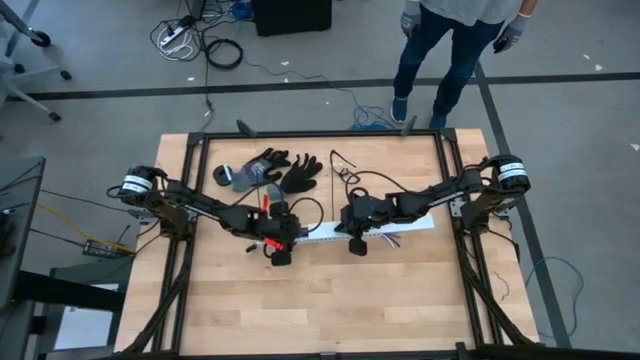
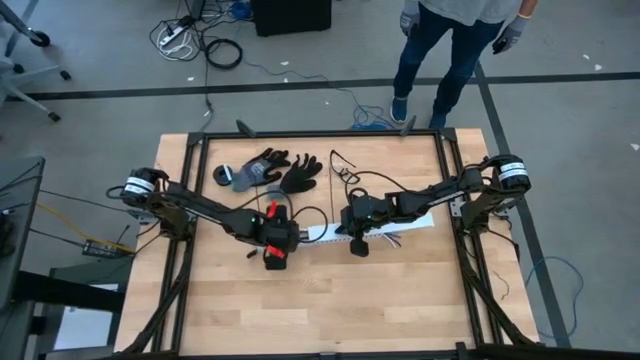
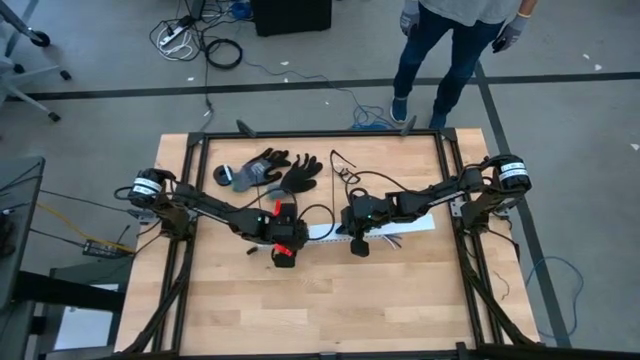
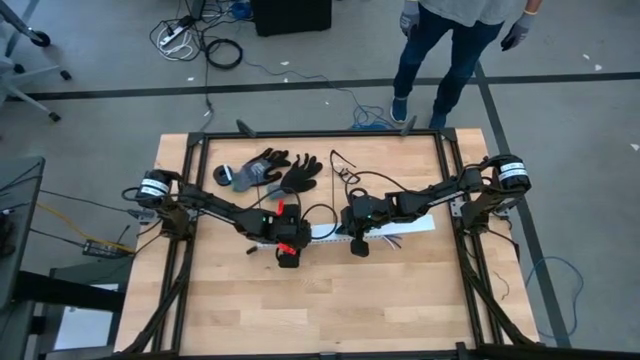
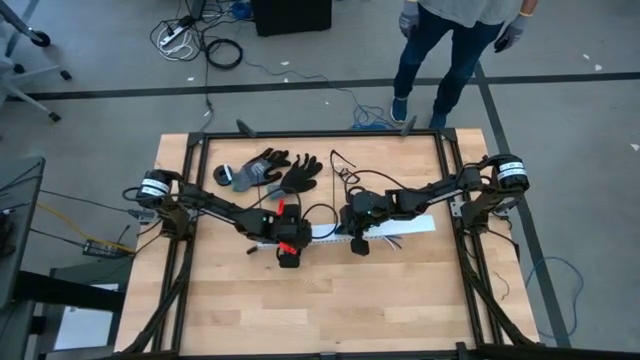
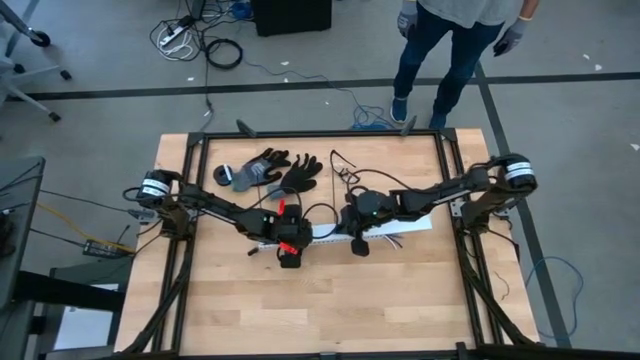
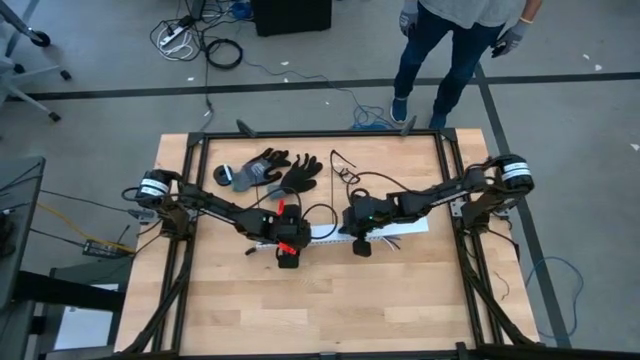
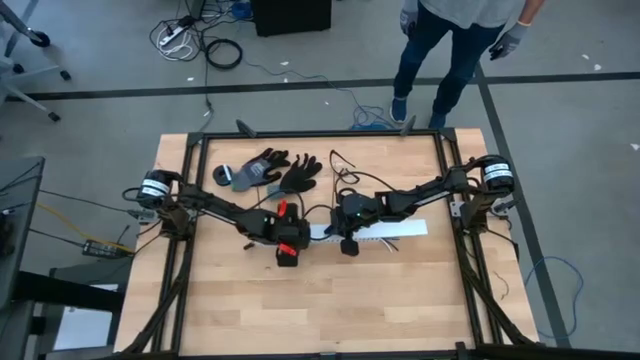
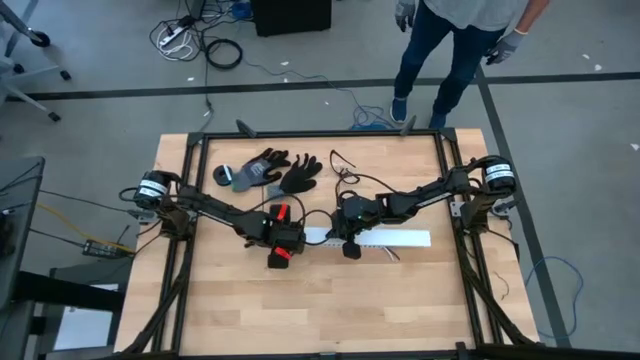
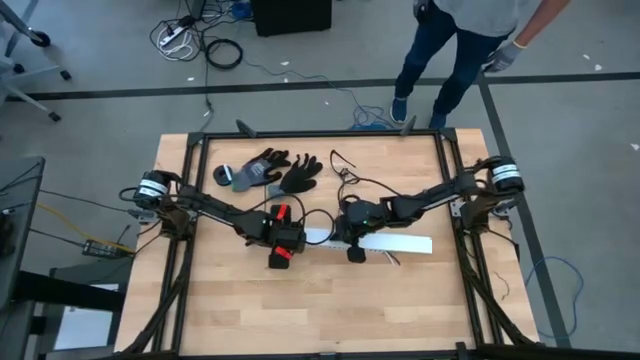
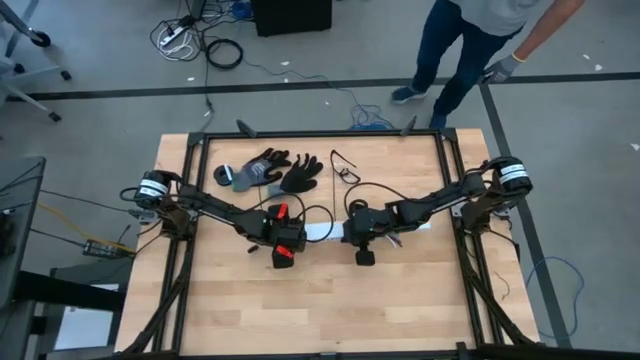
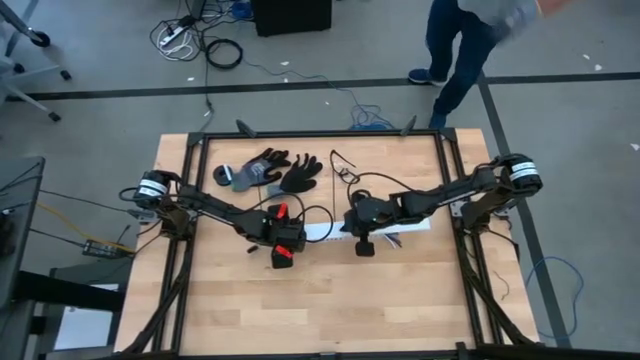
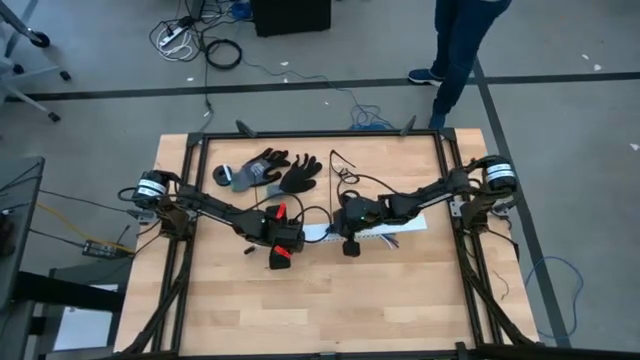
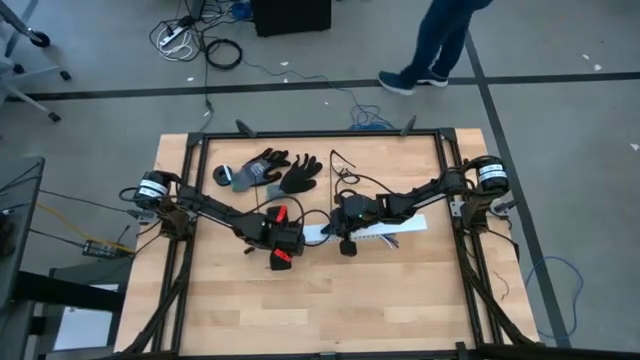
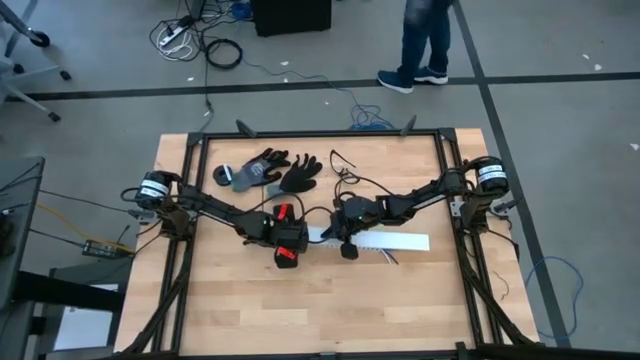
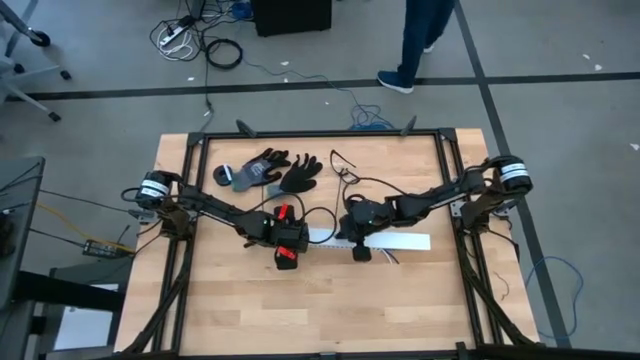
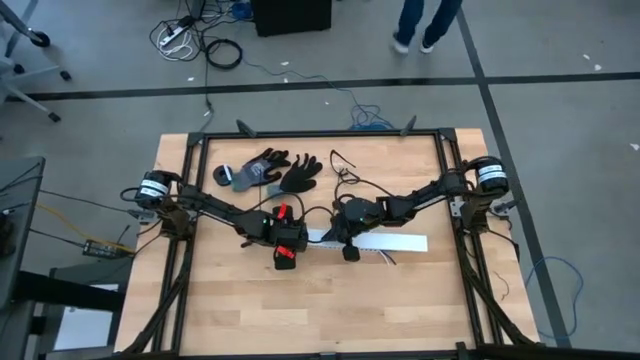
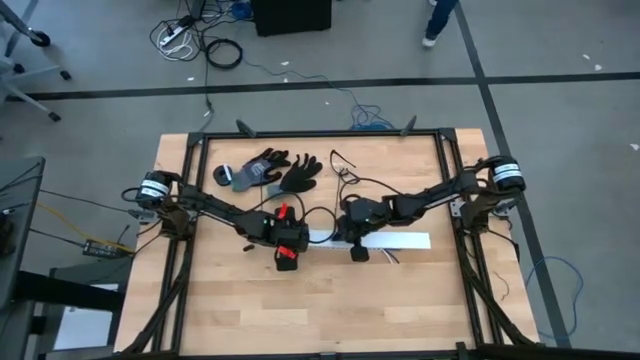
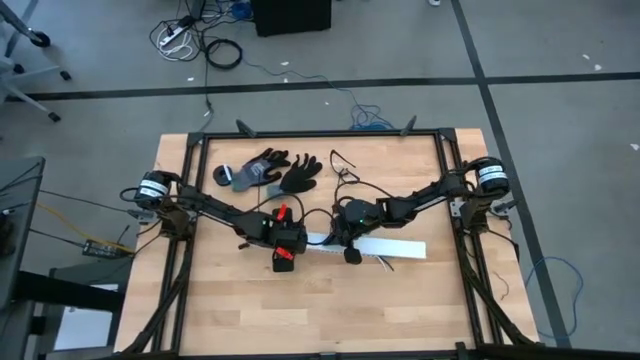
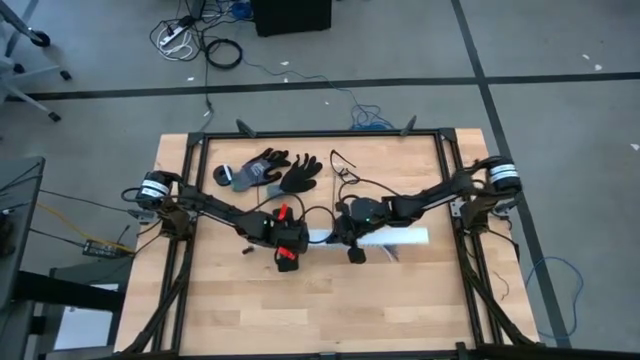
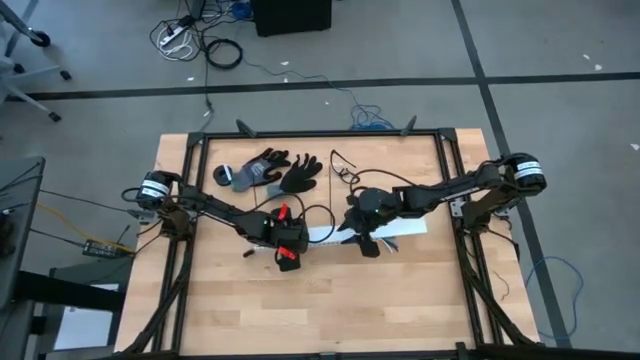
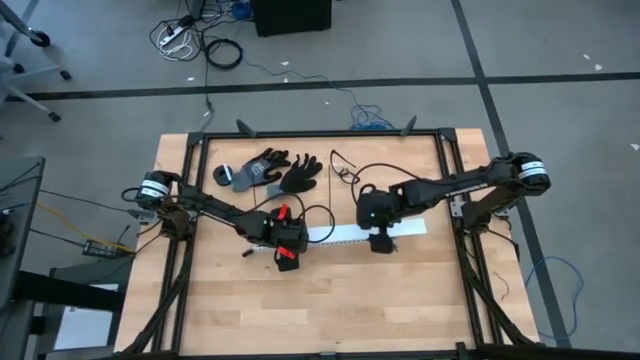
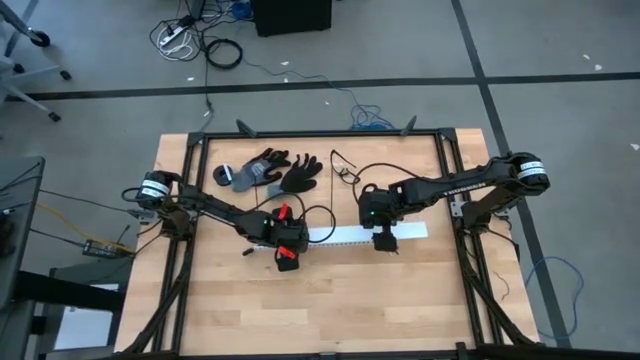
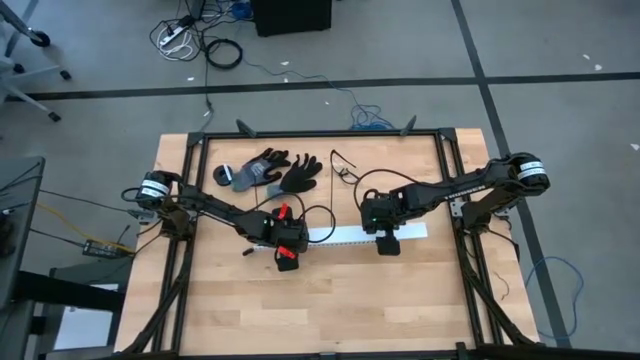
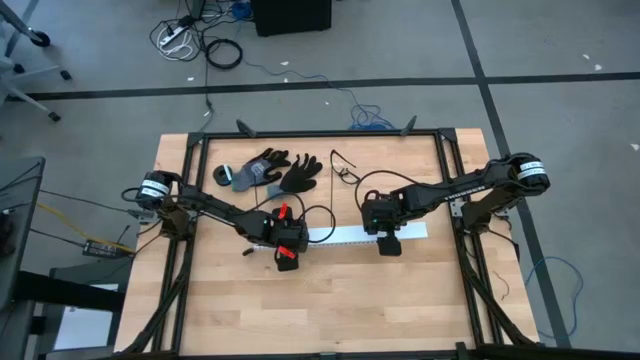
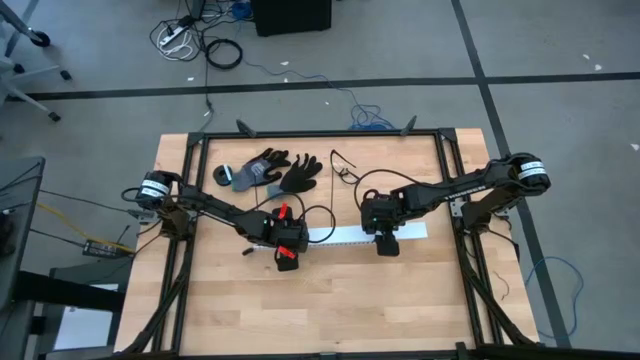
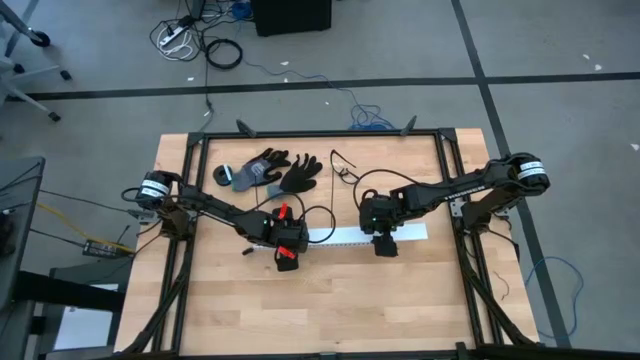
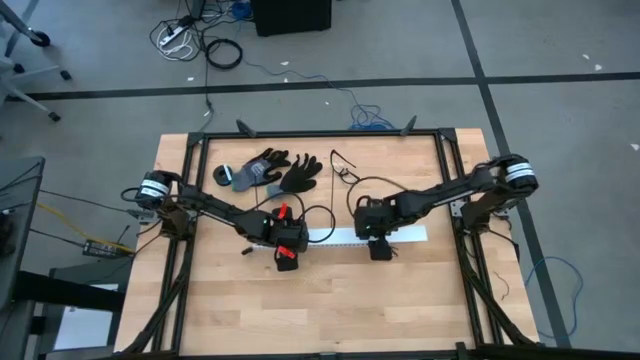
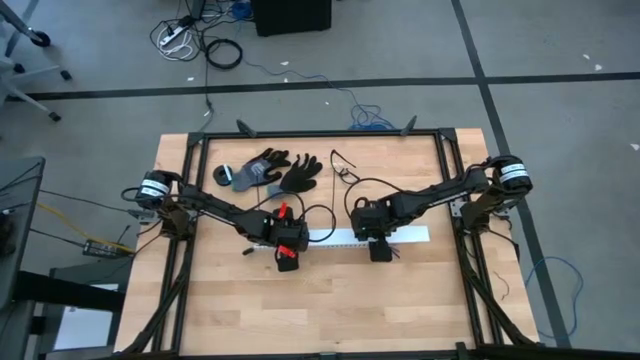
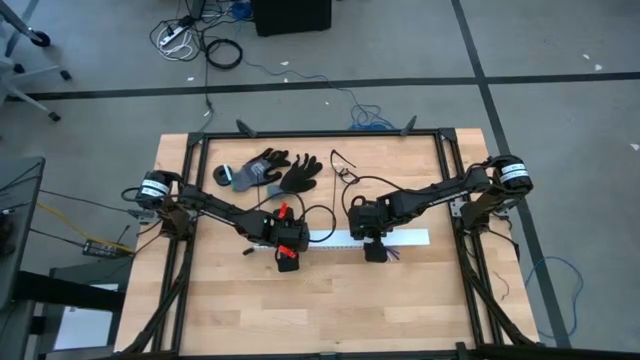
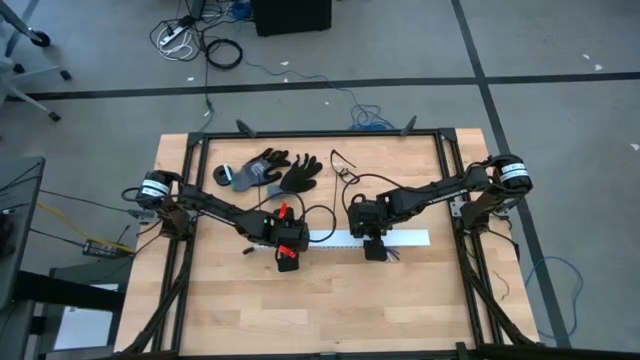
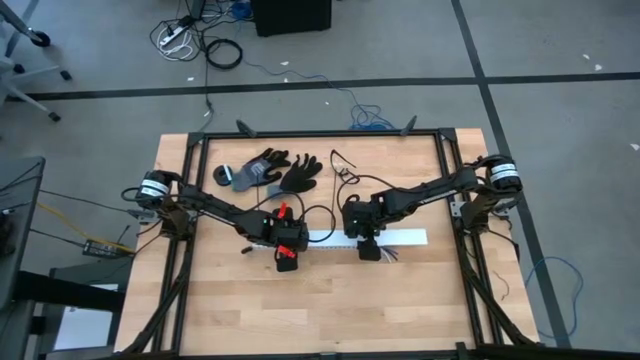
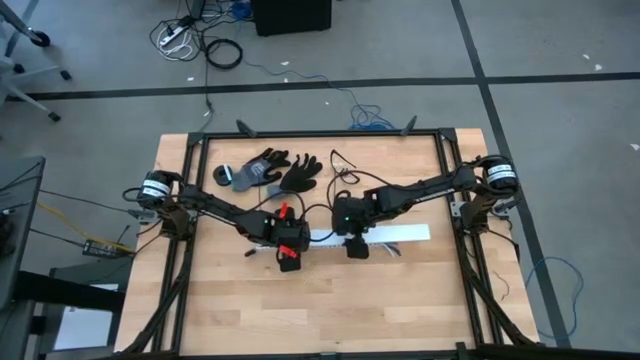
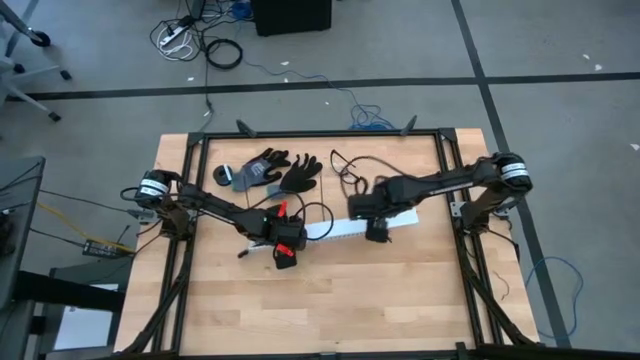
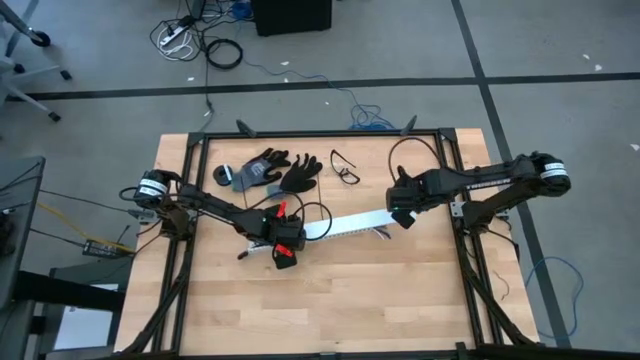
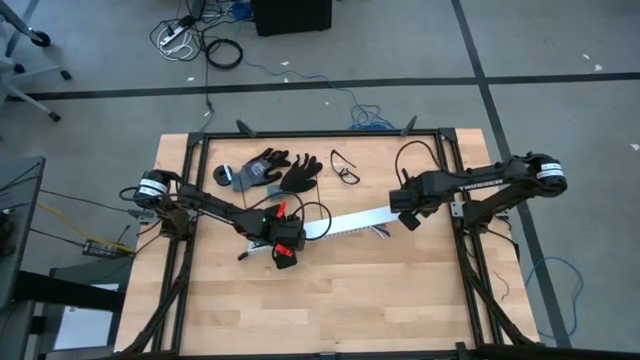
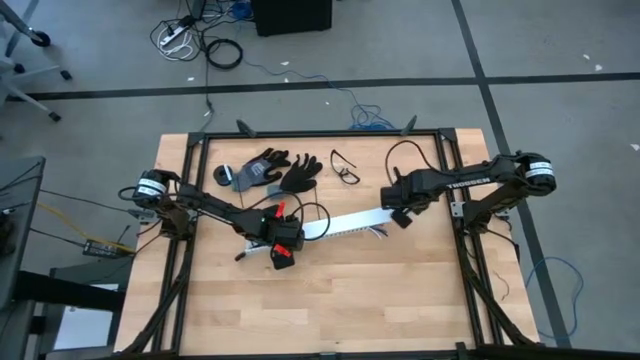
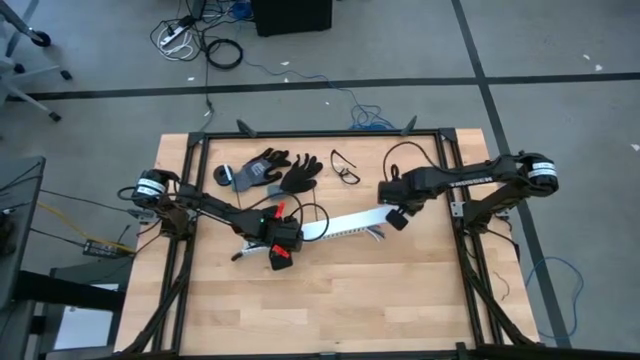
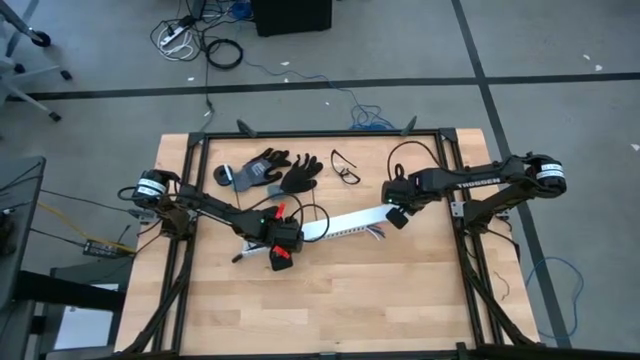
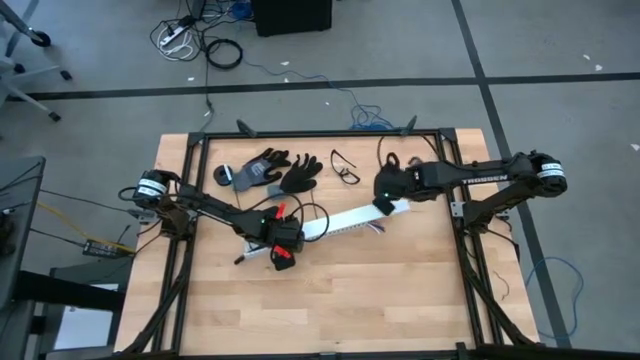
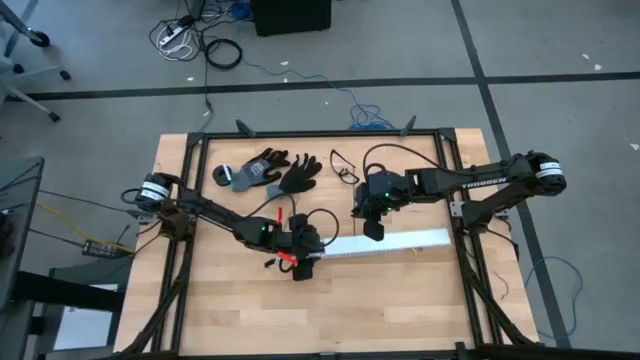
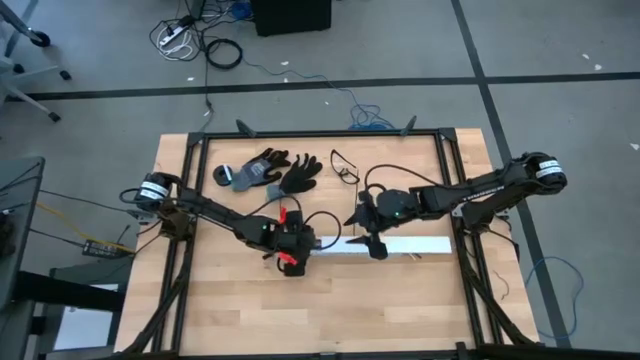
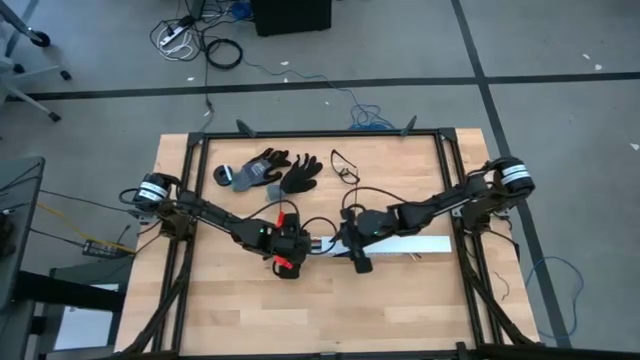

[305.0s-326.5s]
Task: Ziptie cables
Close the white cable duct
